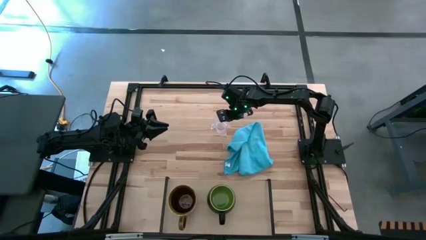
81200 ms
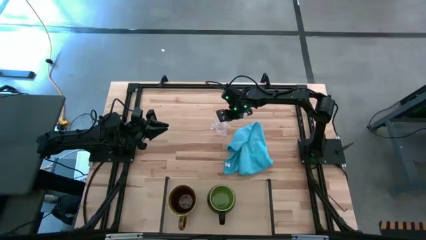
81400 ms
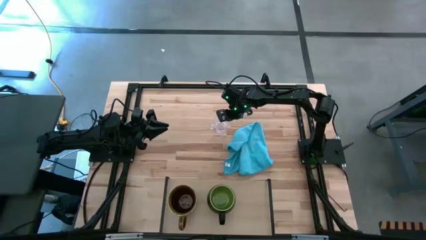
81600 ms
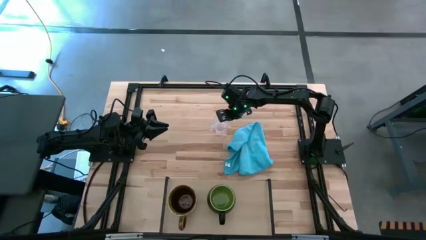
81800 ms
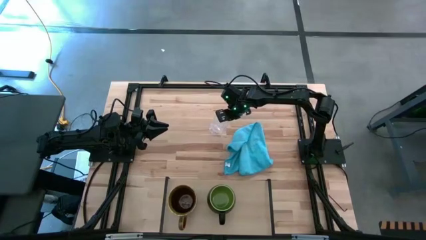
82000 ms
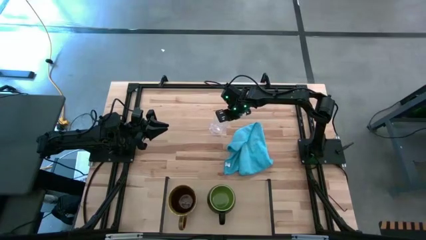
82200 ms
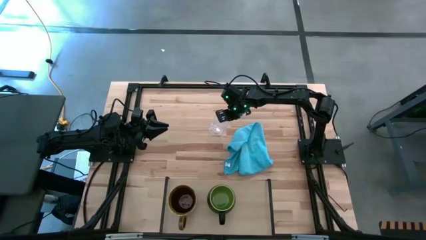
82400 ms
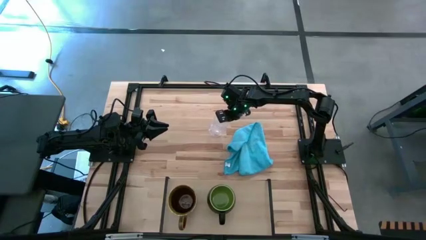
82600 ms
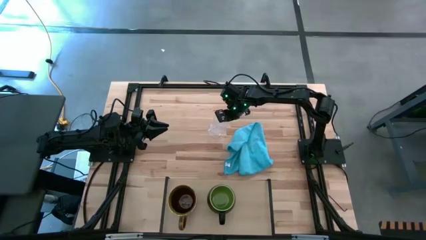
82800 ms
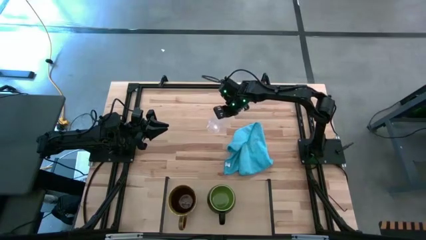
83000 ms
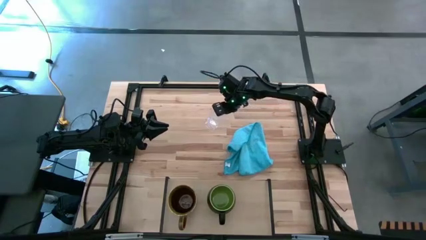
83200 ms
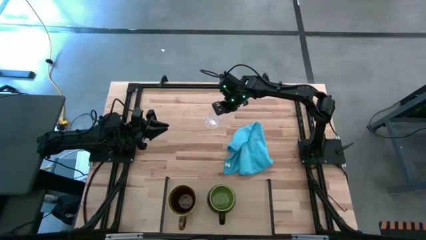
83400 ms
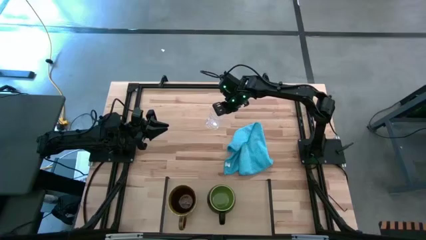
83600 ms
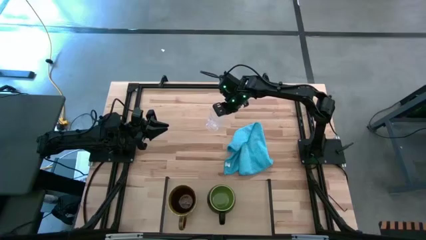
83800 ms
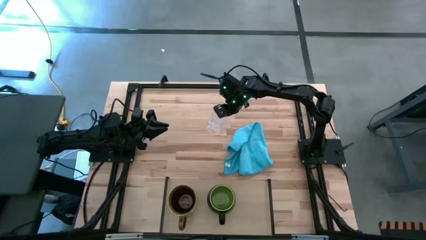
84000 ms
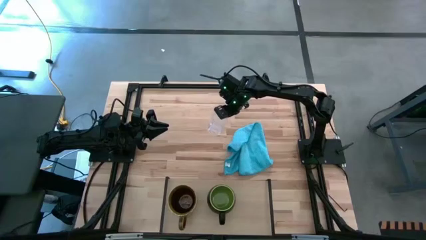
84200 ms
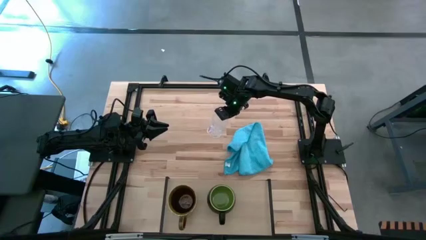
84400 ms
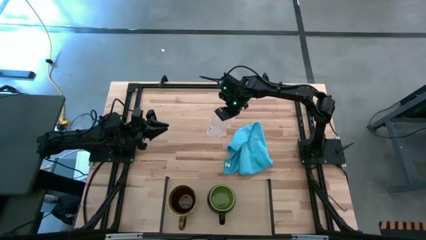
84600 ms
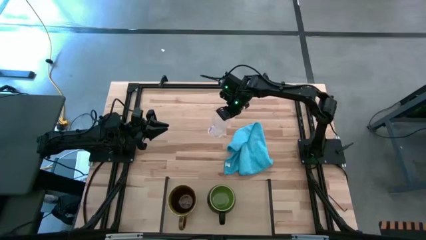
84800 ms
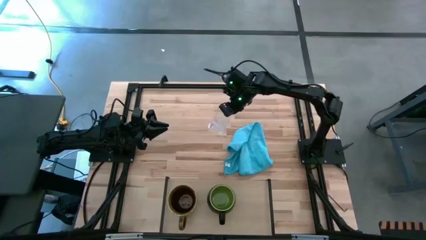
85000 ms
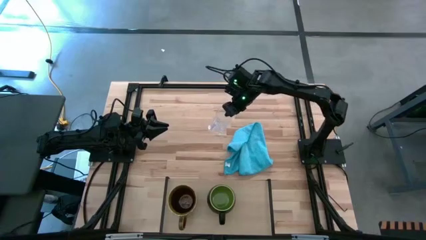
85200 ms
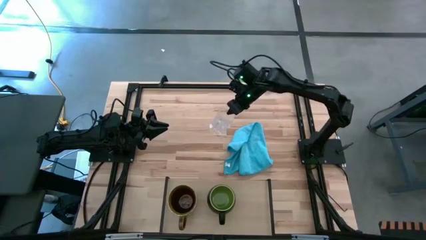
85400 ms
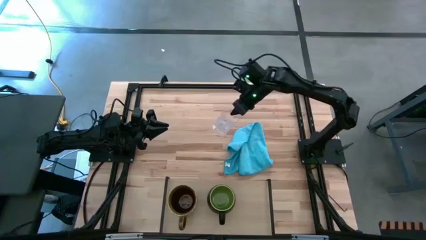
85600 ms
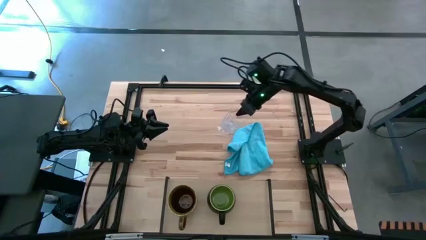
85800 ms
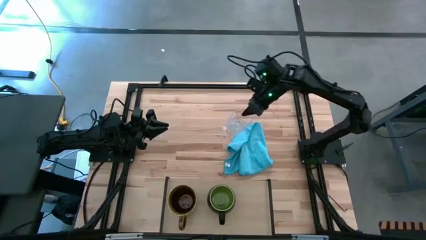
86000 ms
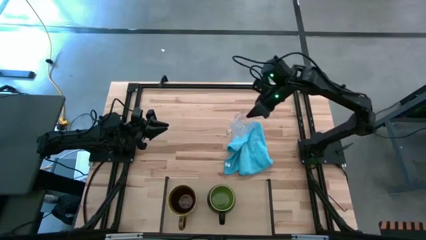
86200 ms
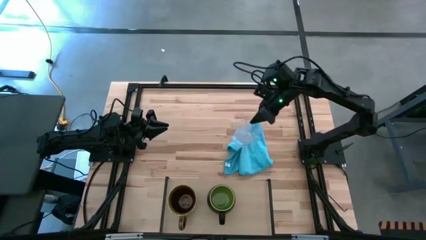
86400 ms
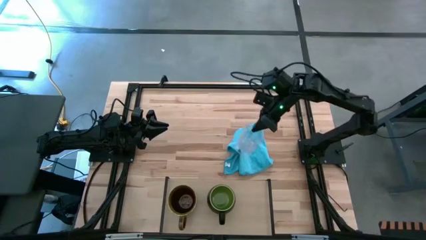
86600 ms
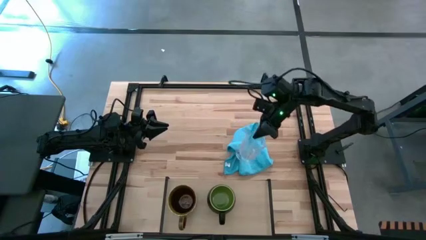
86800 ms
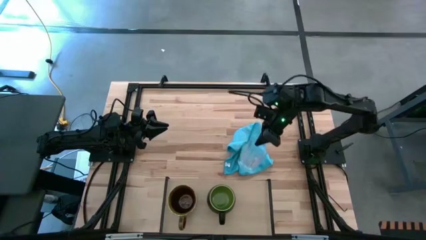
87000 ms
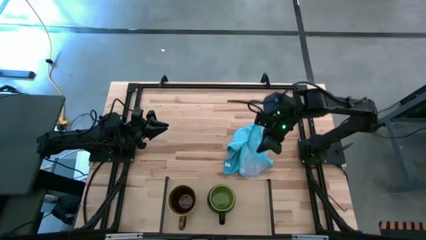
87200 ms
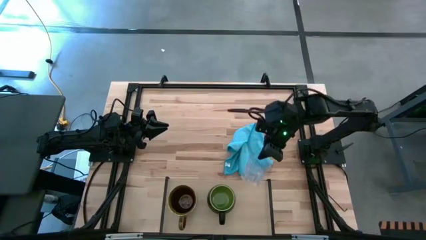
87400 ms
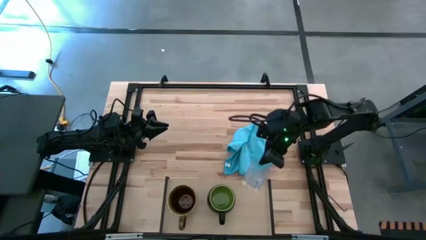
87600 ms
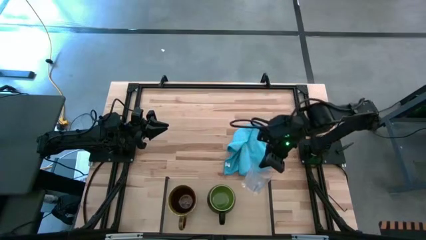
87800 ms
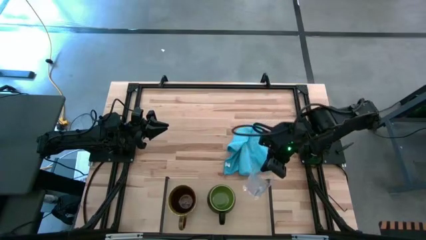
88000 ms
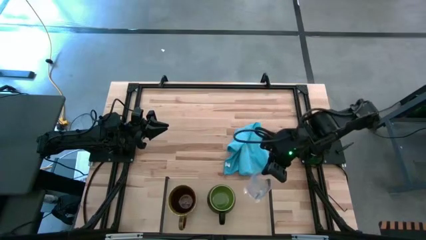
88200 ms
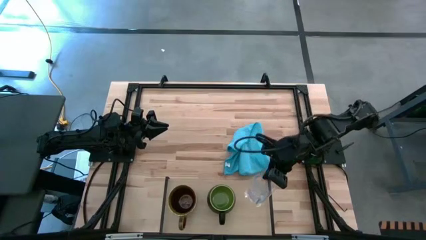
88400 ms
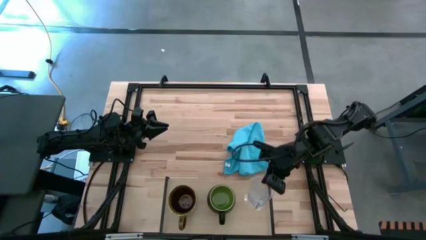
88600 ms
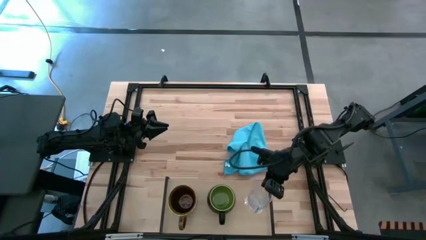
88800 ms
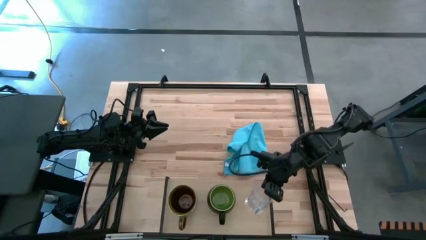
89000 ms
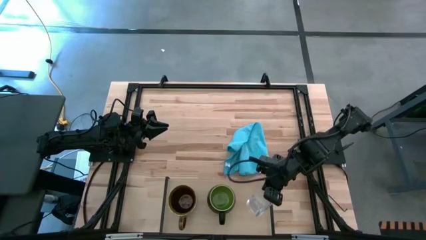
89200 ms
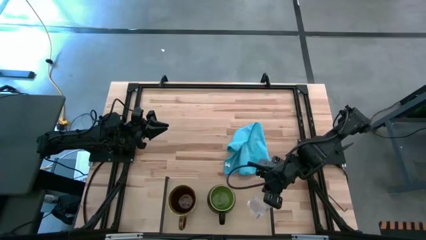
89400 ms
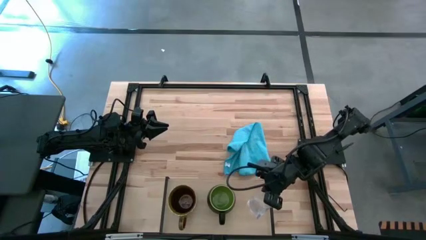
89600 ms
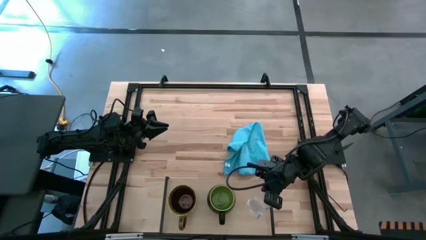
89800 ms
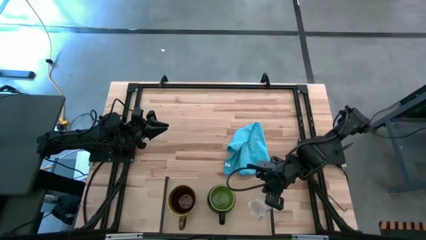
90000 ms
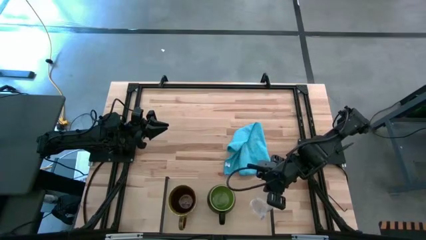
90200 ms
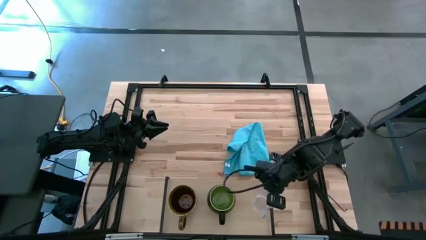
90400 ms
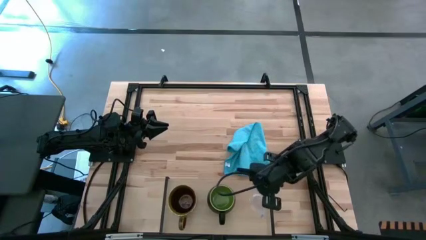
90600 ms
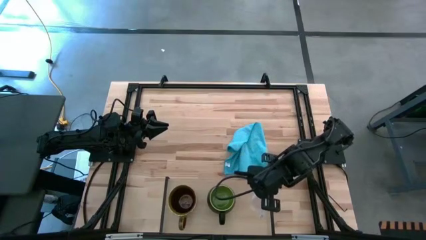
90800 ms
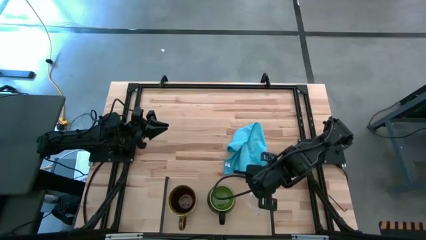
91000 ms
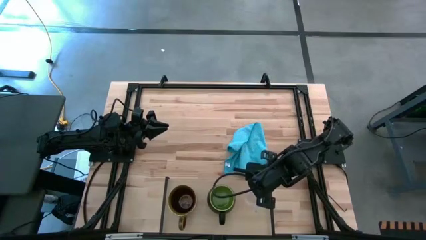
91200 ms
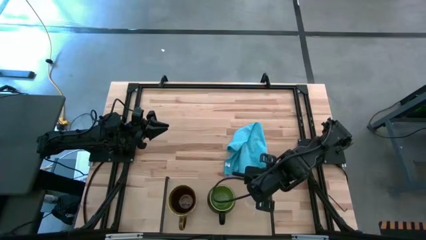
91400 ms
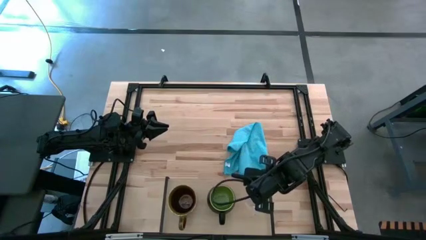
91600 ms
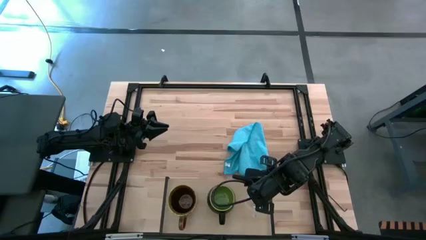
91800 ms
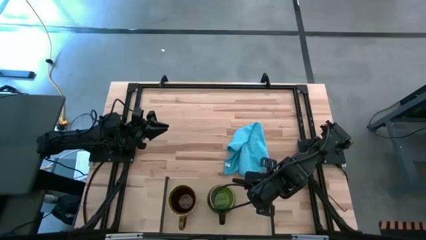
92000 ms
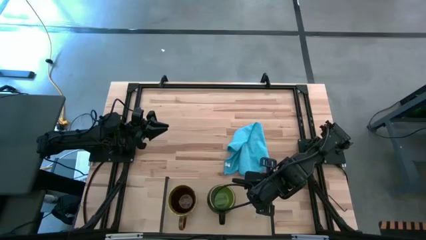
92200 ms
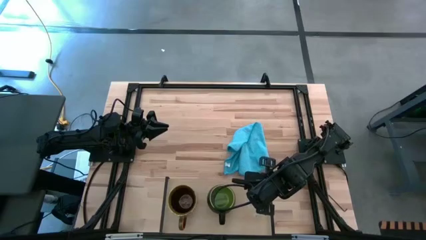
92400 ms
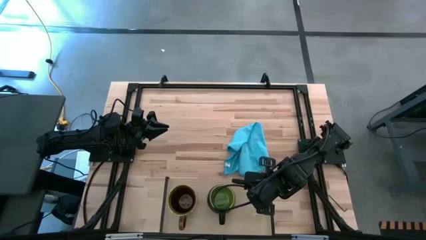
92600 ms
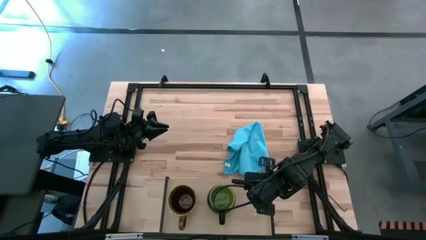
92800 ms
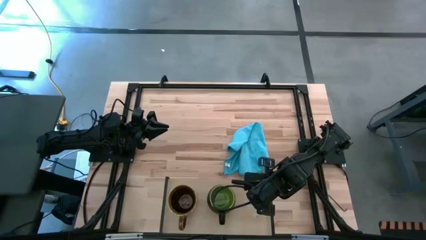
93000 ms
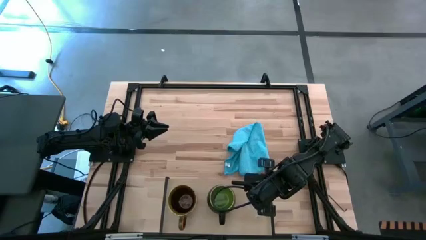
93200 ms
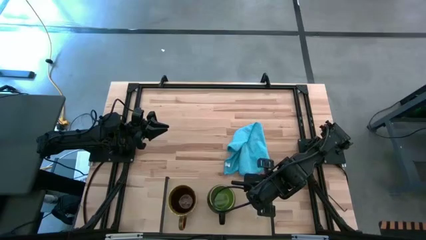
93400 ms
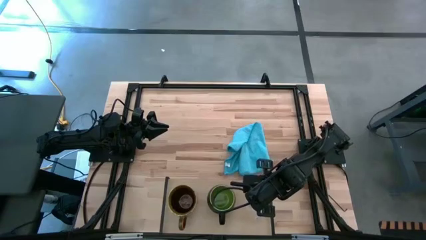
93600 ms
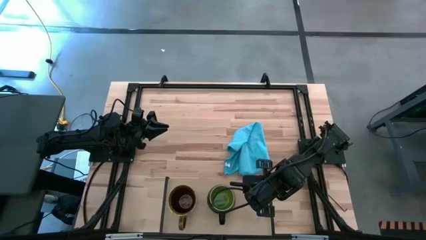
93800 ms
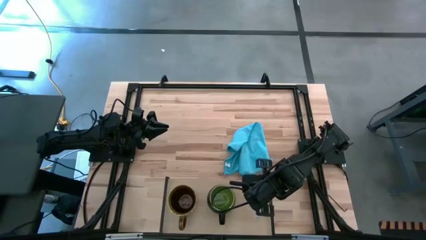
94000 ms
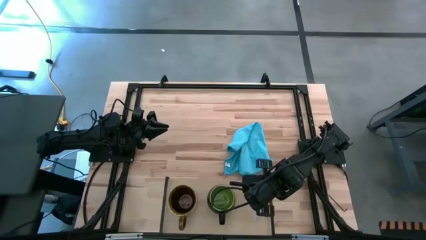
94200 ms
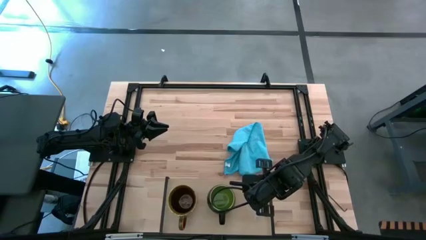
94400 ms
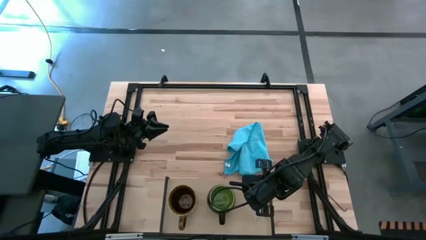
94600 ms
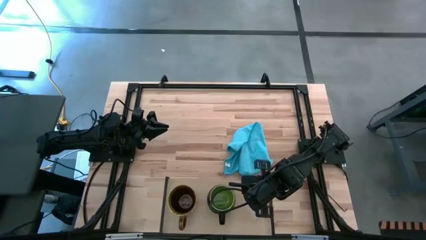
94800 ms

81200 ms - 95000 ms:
Task: Stack small to large cups/mugs on shelf
Put the transparent mug on the shelf

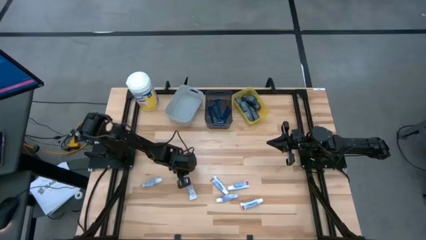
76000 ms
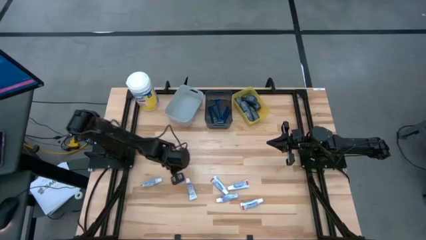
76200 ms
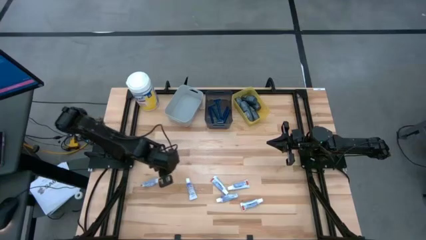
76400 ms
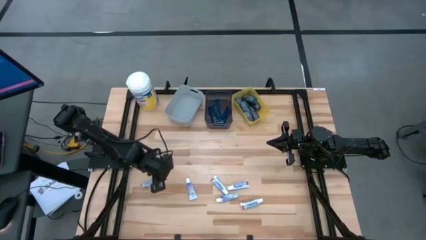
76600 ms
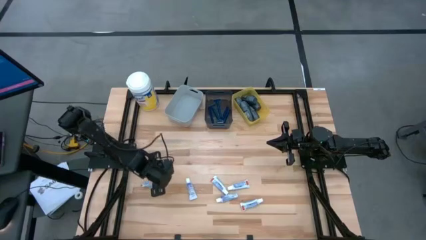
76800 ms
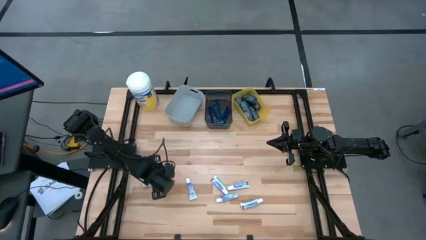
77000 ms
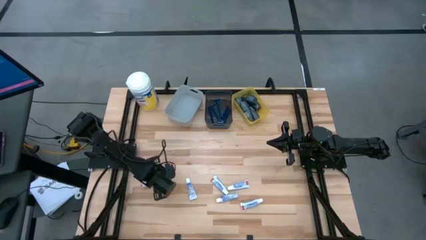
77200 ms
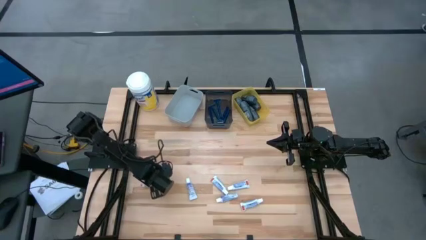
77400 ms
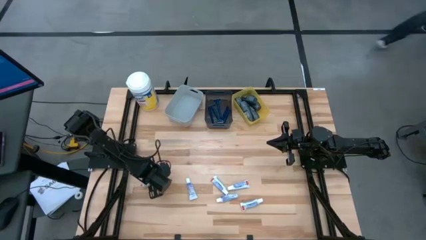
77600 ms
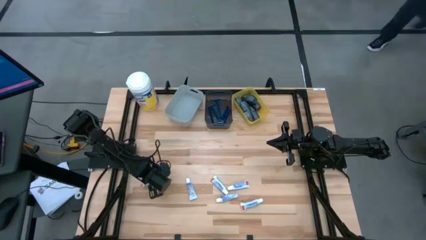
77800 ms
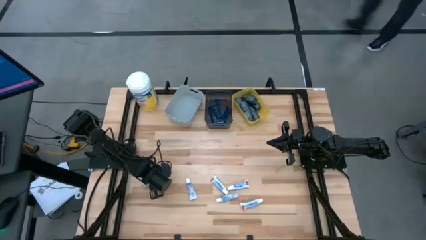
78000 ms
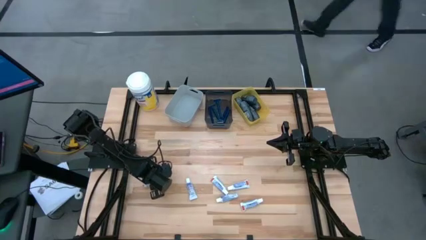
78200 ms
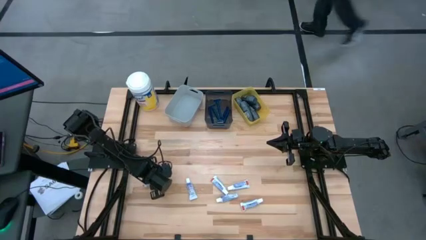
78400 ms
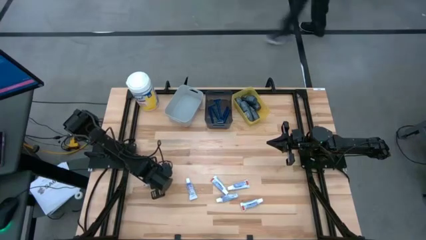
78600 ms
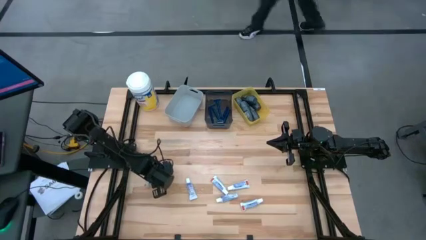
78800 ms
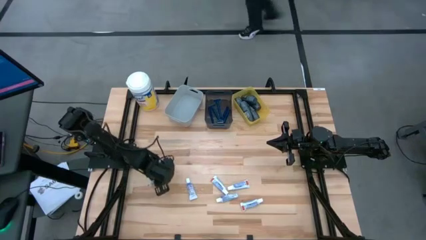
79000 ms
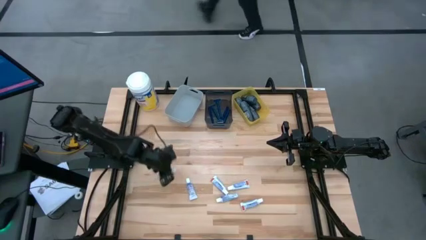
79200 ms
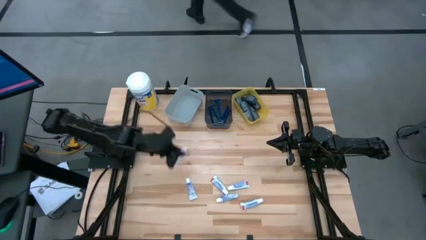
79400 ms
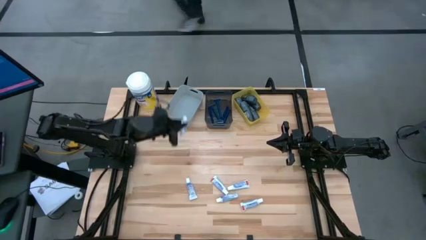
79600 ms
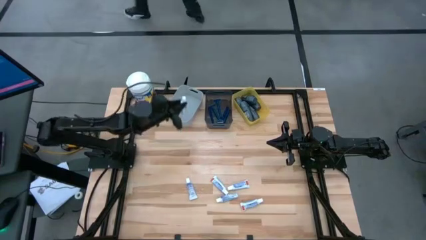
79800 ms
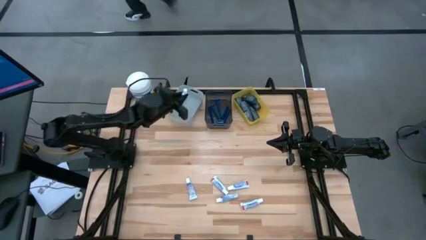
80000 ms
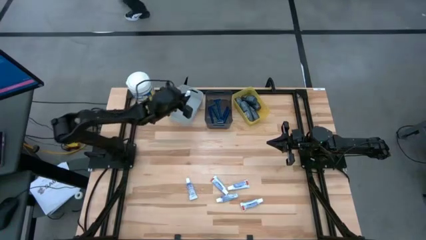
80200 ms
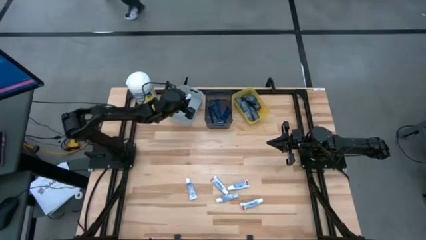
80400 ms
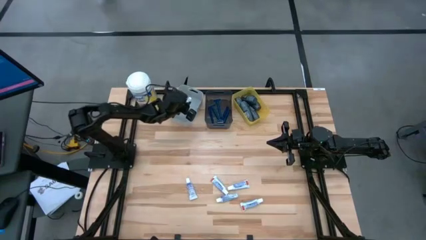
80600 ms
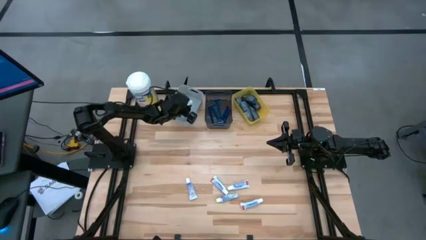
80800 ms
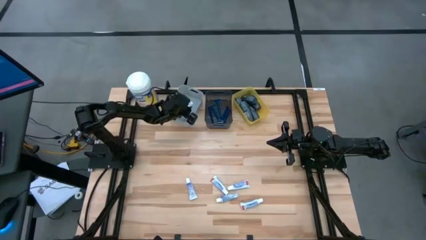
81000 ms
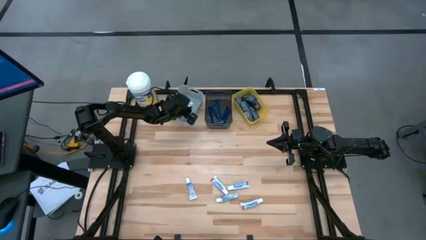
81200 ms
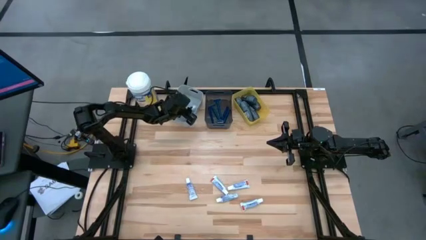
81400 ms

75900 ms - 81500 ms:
Task: Pick & Place Travel size toiletries
Put the toothpaste into the gray bin
